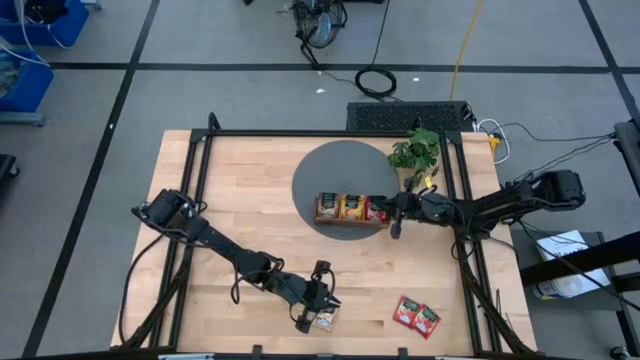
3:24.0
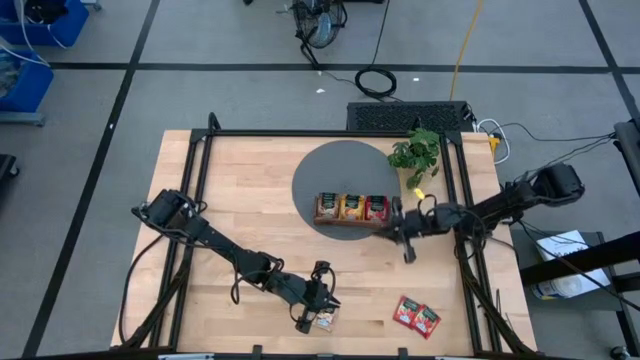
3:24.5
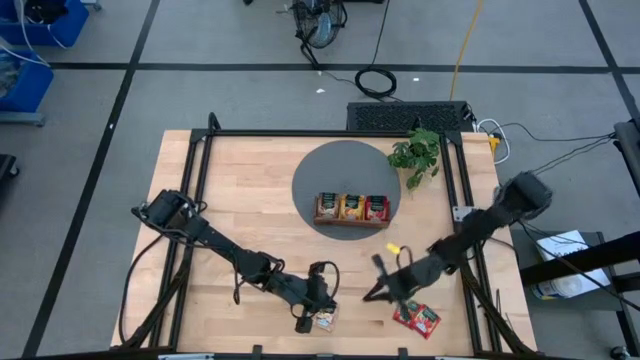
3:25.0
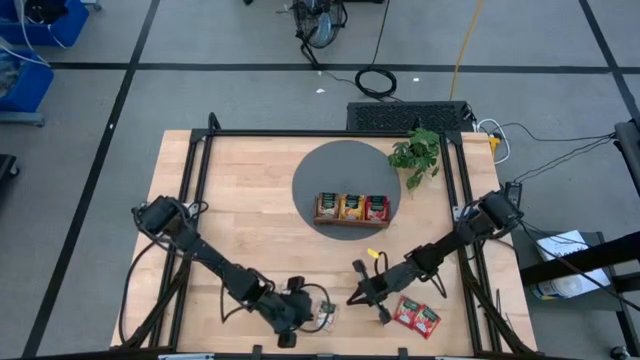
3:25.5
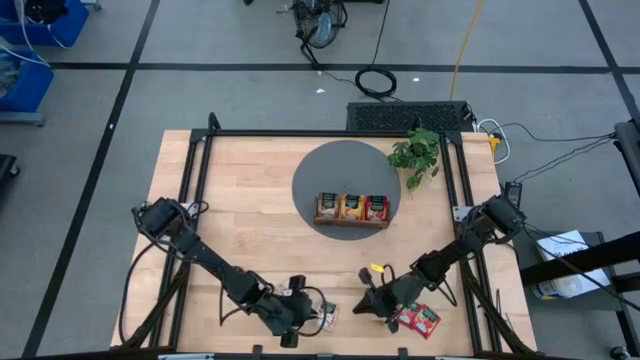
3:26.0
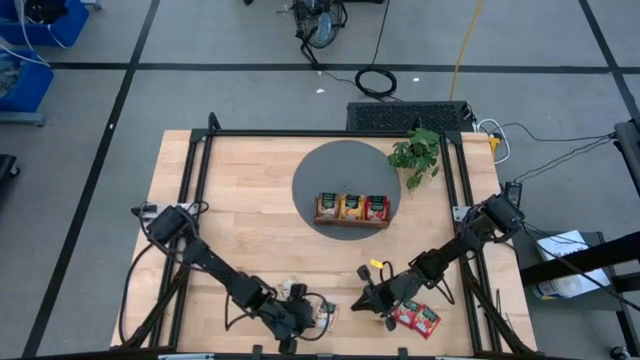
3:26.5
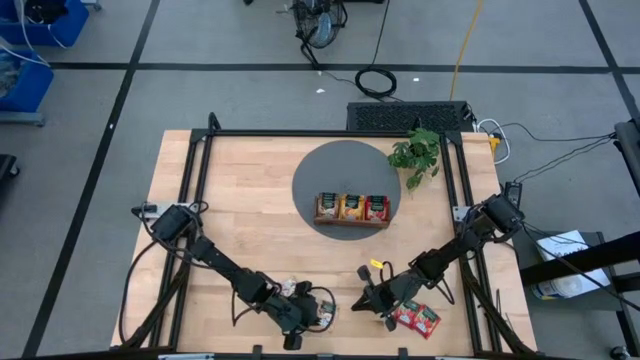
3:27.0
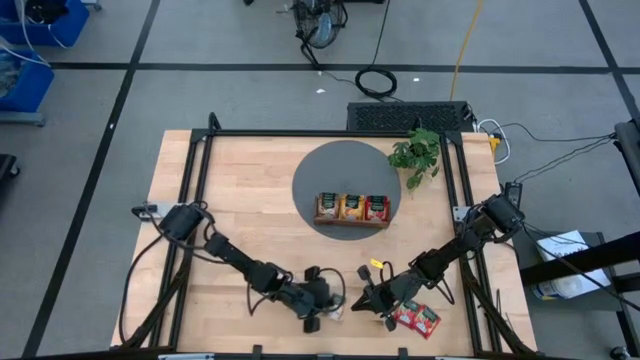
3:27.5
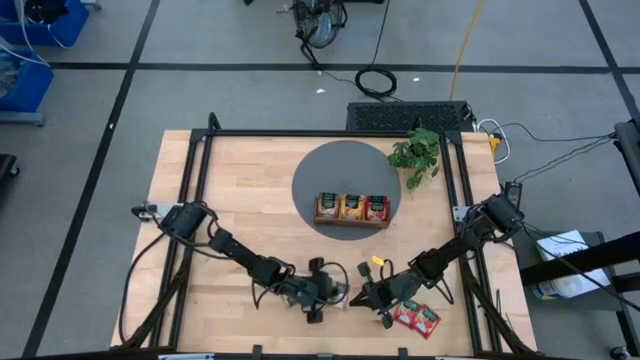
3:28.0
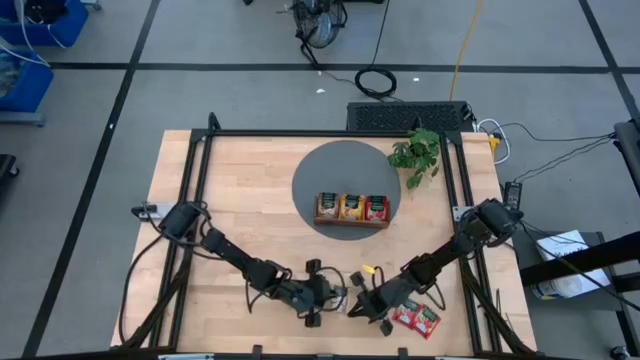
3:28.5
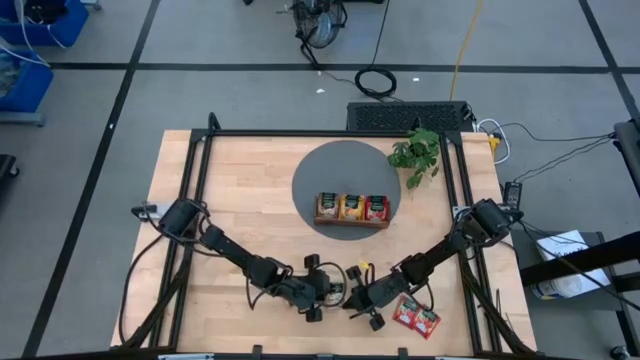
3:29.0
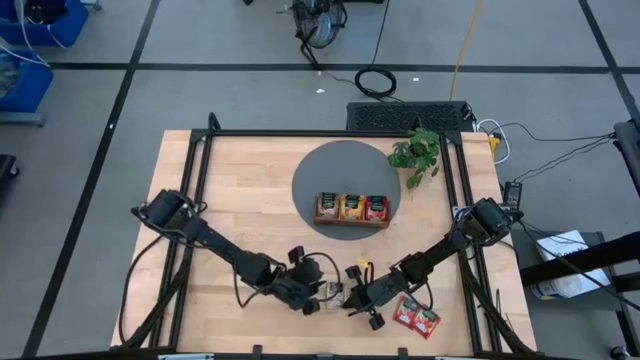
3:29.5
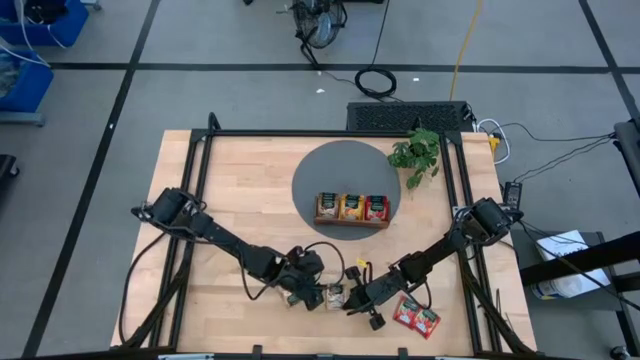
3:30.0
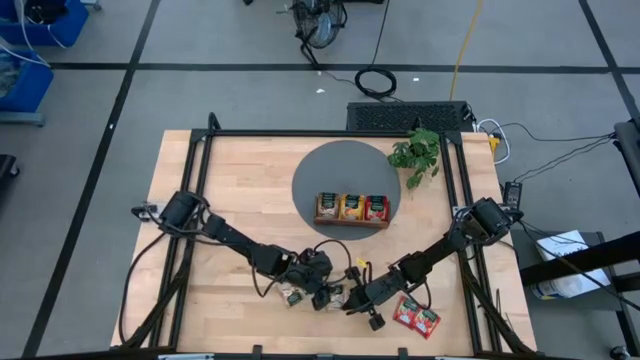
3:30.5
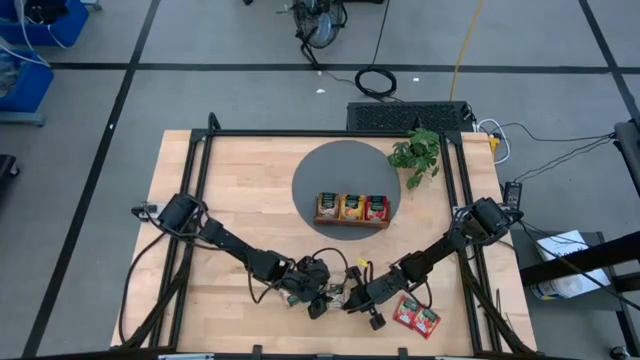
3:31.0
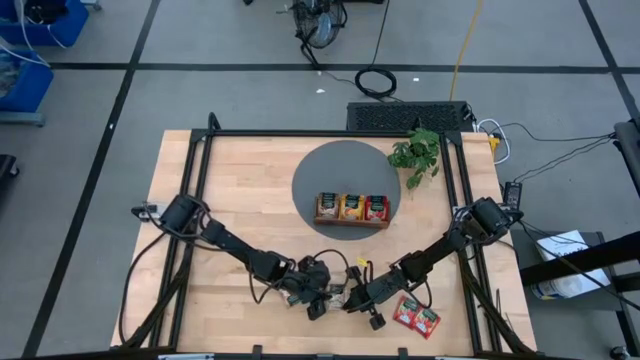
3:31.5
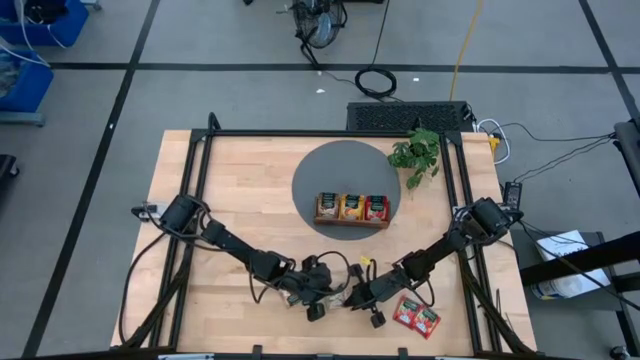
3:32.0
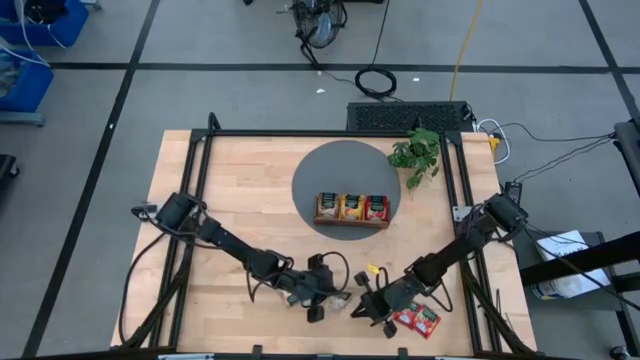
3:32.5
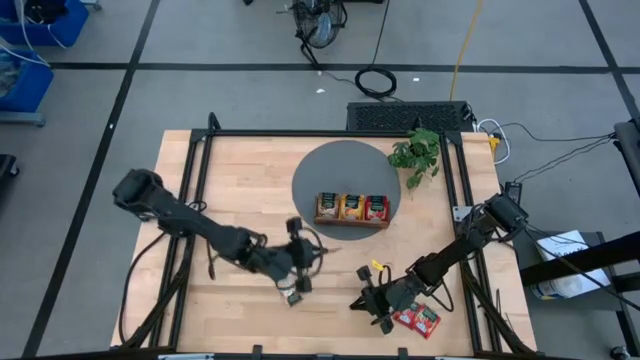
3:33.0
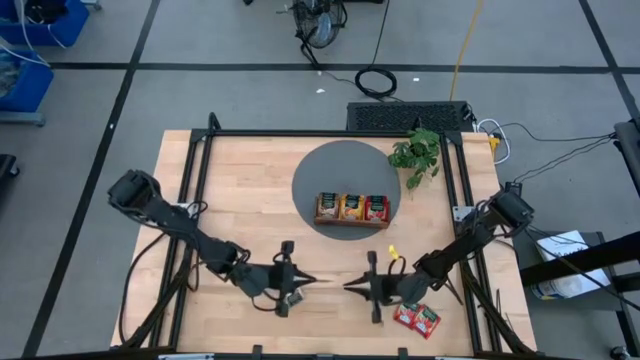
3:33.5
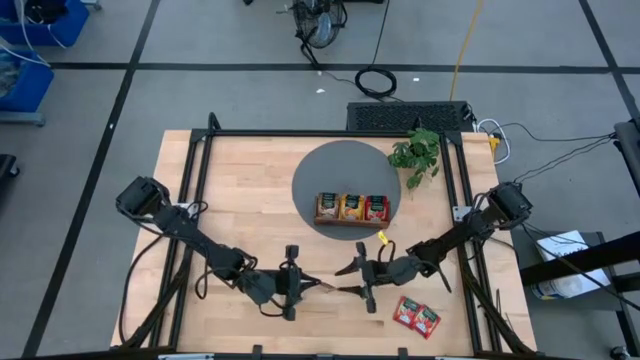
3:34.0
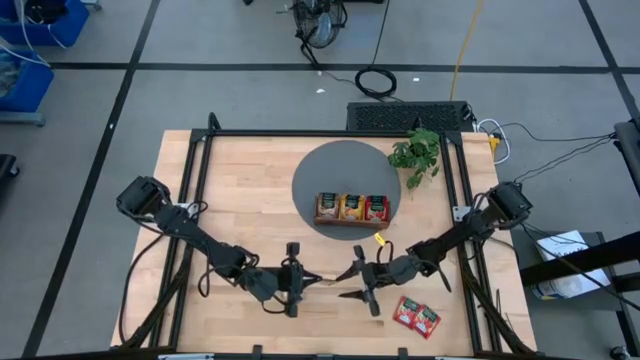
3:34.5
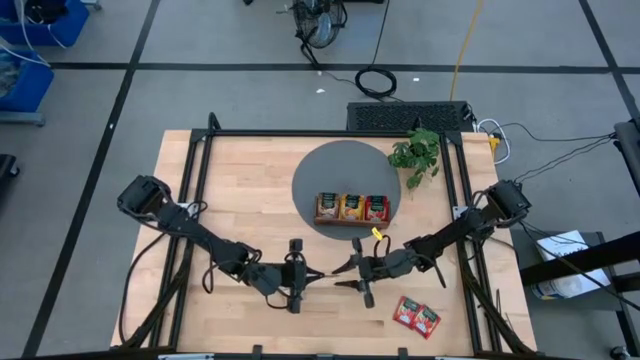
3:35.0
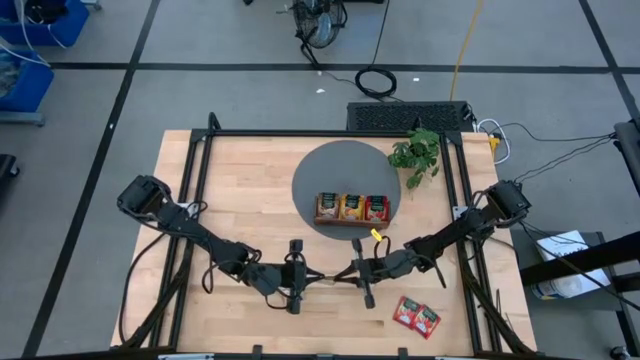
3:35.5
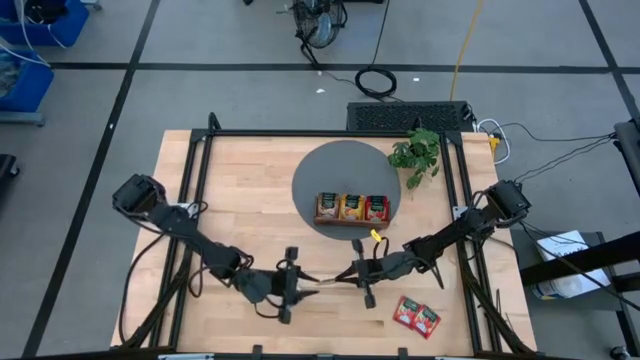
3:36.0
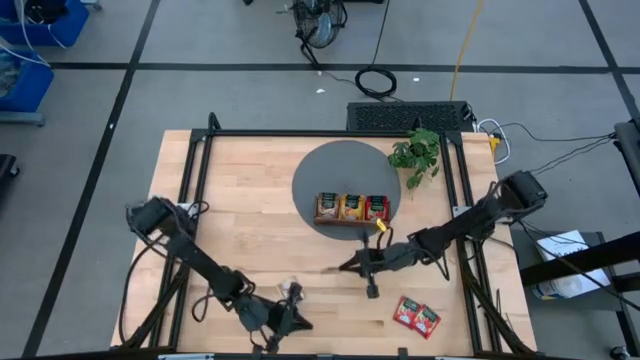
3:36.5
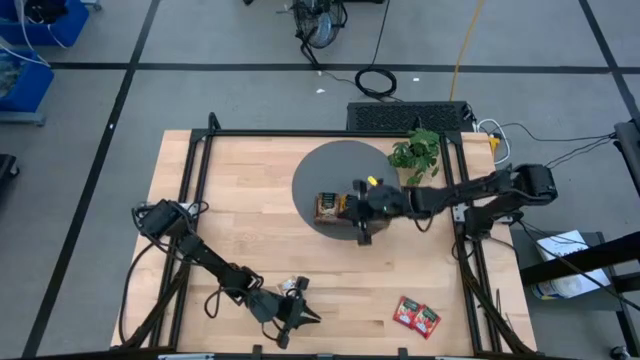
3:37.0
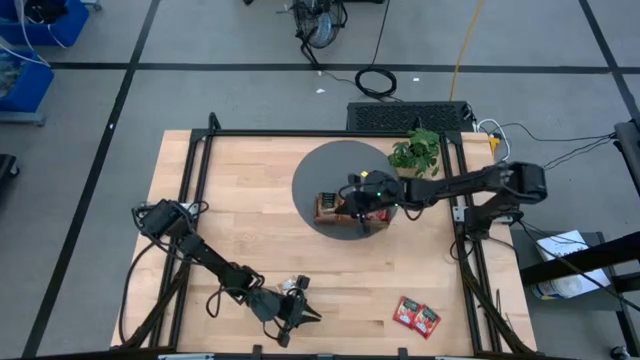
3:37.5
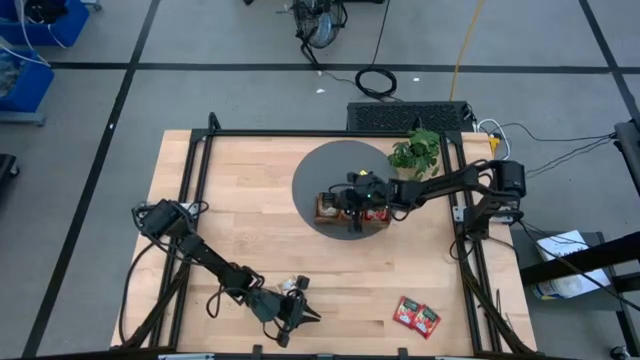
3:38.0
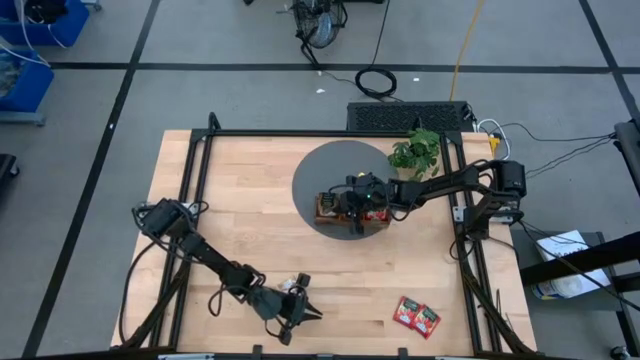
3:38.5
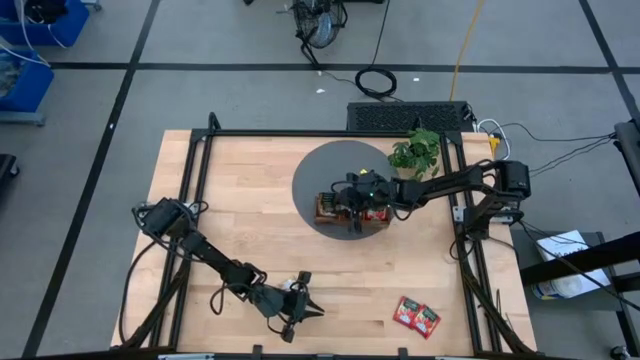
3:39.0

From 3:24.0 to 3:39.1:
Task: Pick & Place Tea
Put the brown tea bag into the left section of the wooden organiser

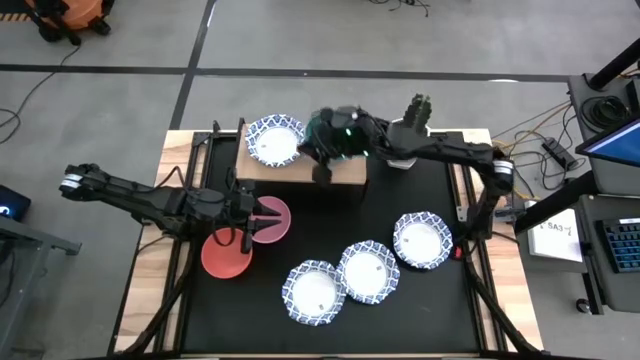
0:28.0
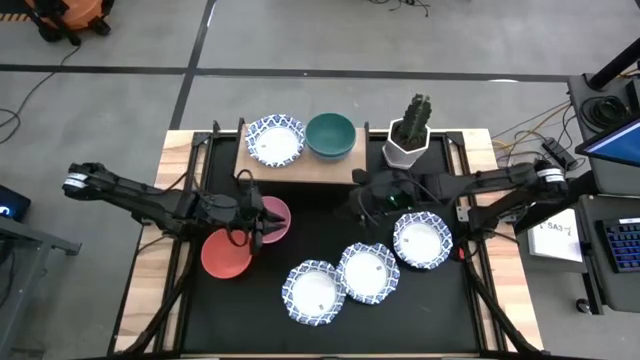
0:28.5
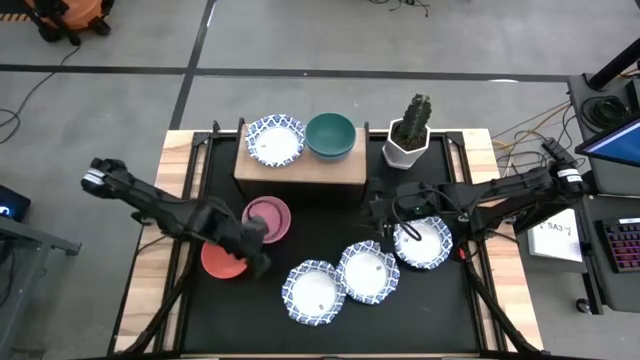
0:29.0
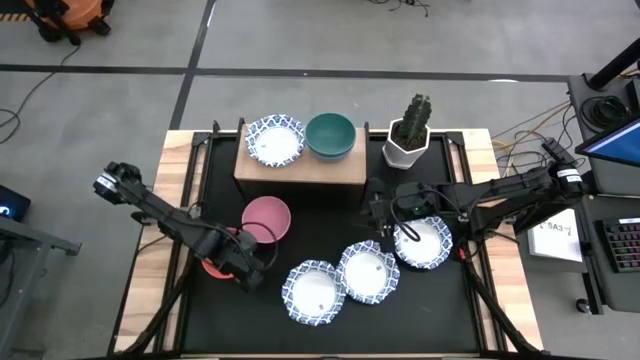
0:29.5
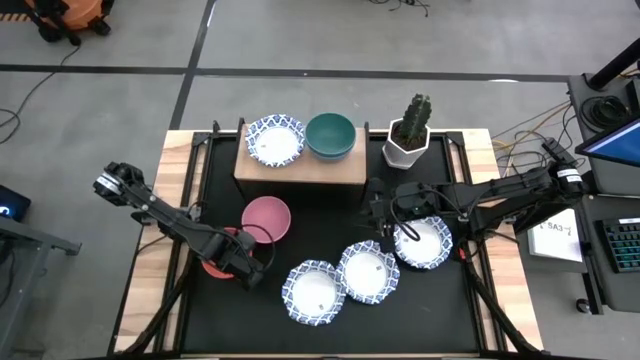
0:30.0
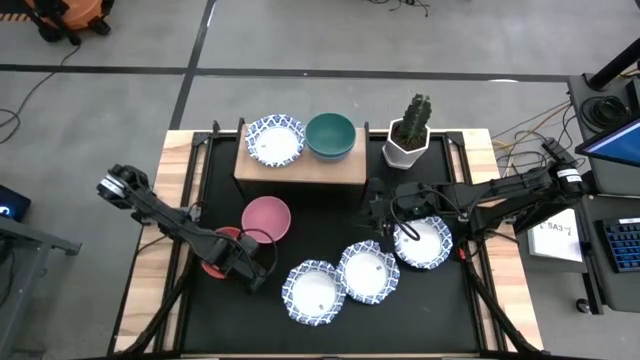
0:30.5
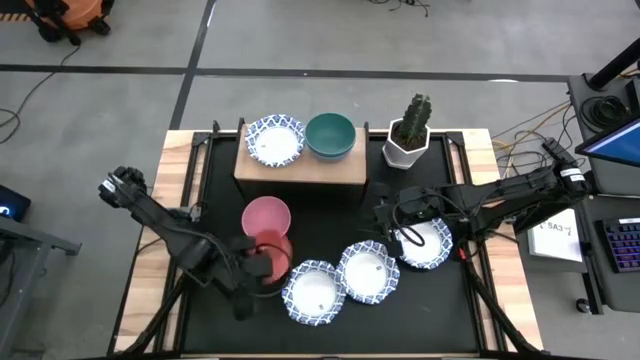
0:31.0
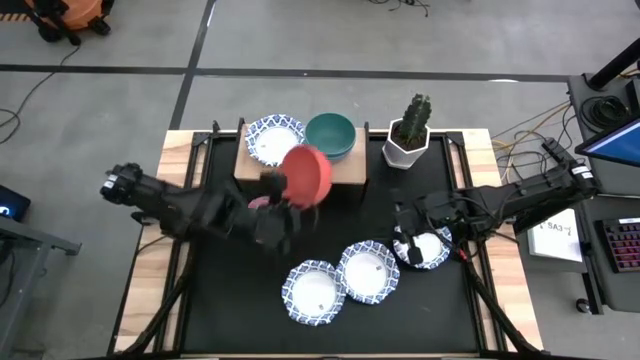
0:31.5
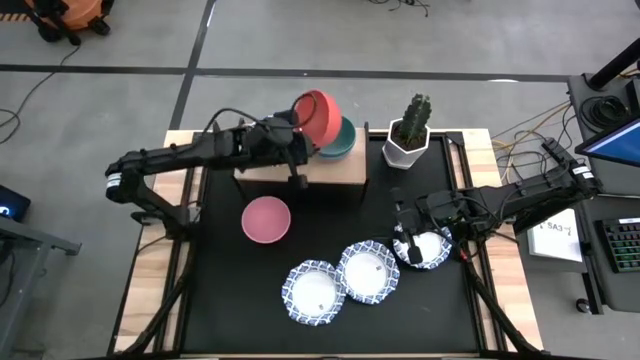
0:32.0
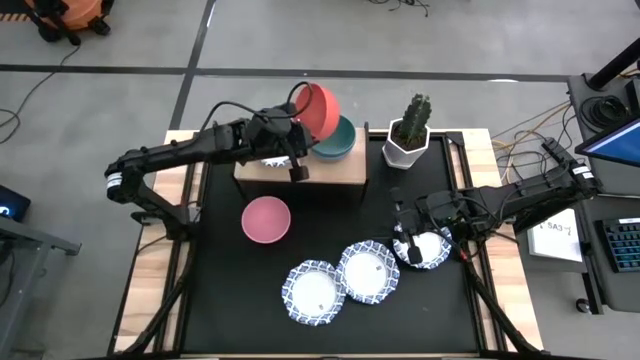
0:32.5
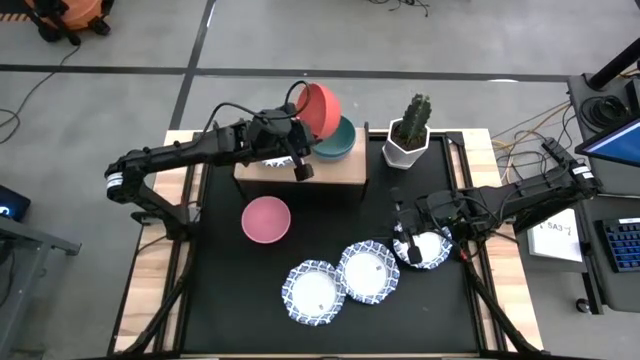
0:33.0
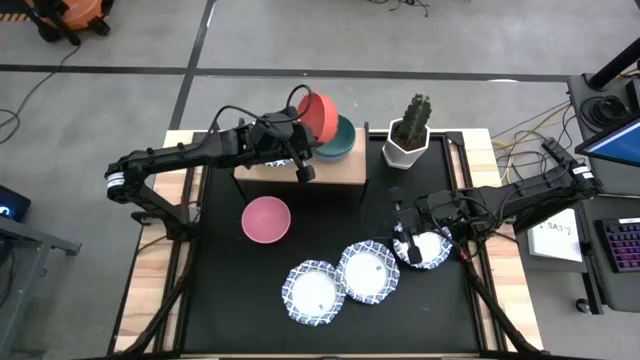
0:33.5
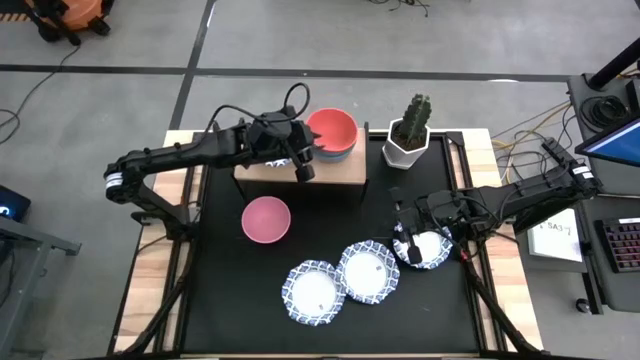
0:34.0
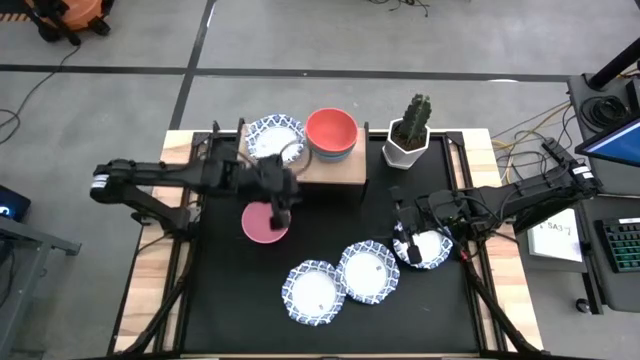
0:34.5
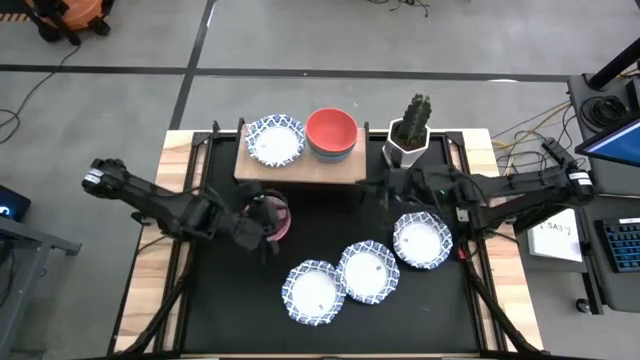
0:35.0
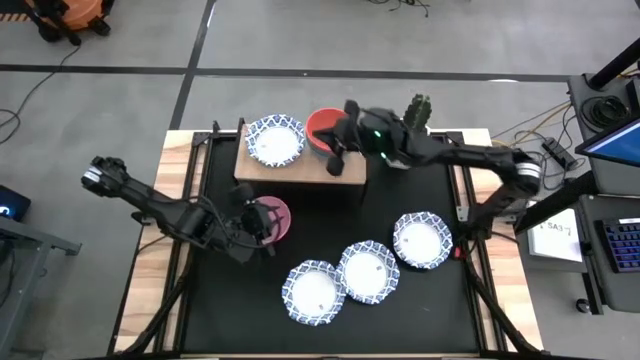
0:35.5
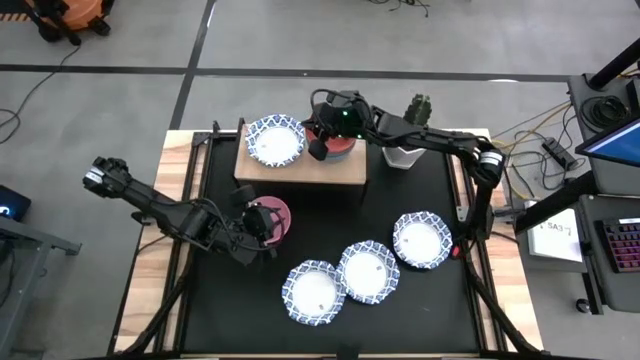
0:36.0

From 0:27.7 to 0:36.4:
Task: Place and stack bowls onto a shelf
Stack the orange bowl on top of the green bowl on the shelf
